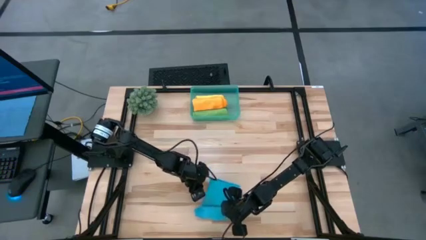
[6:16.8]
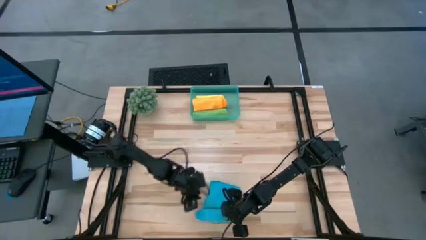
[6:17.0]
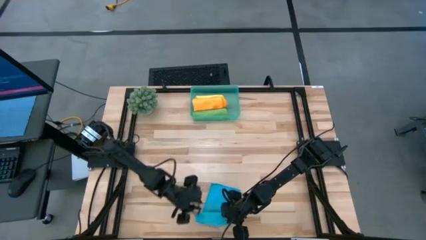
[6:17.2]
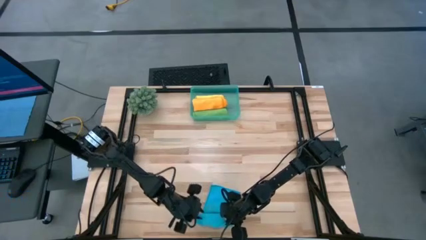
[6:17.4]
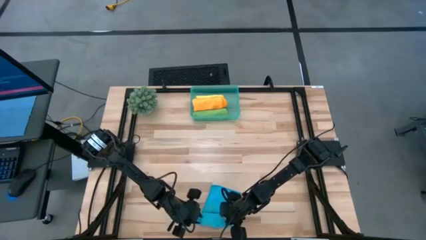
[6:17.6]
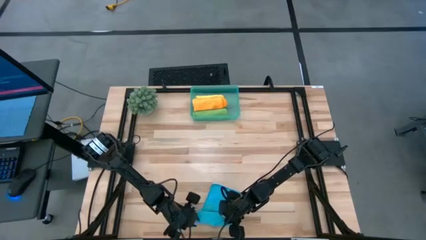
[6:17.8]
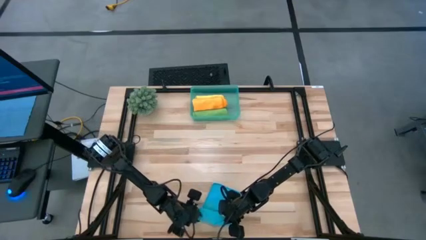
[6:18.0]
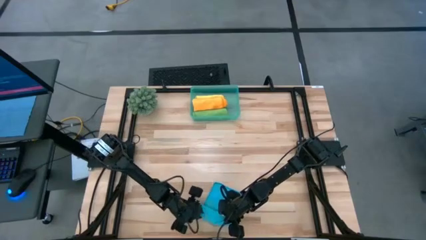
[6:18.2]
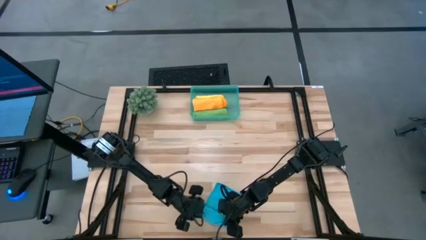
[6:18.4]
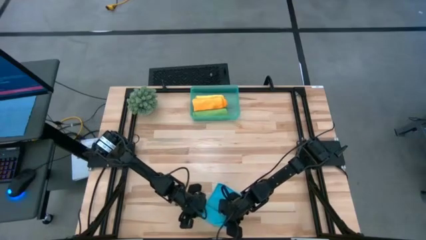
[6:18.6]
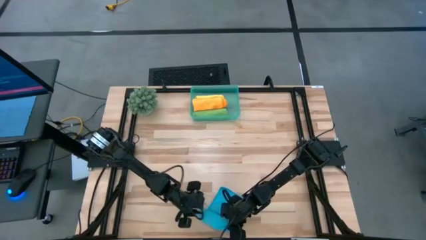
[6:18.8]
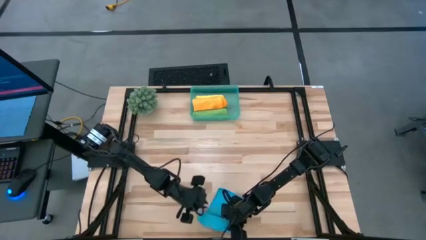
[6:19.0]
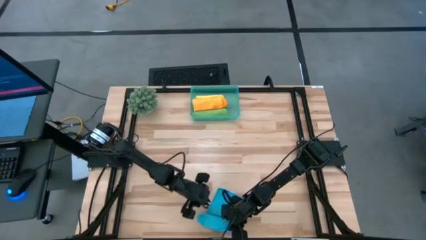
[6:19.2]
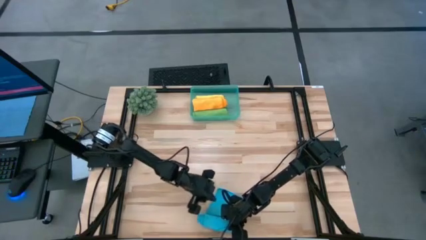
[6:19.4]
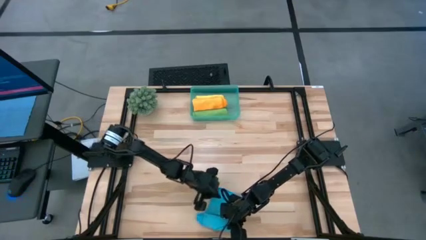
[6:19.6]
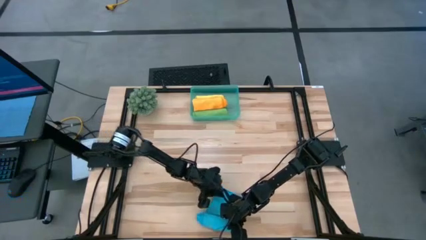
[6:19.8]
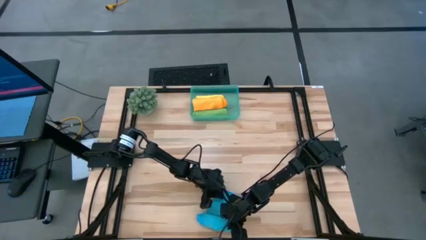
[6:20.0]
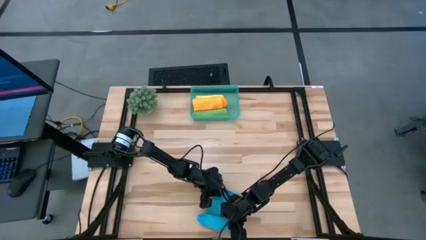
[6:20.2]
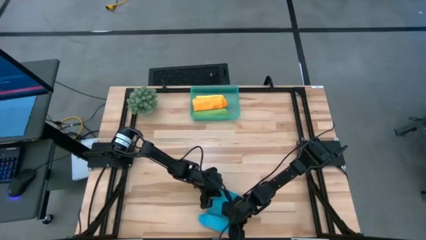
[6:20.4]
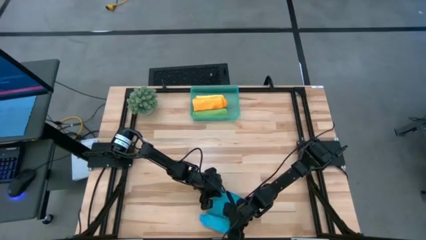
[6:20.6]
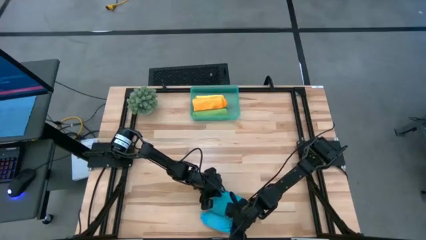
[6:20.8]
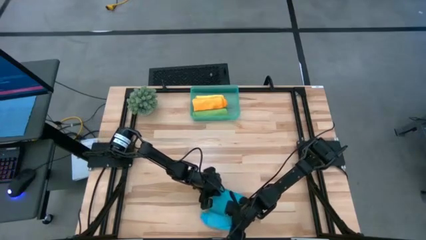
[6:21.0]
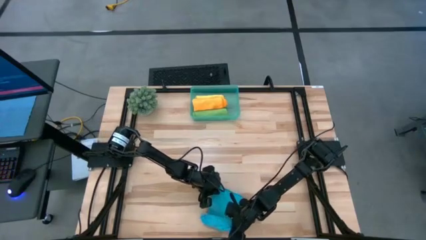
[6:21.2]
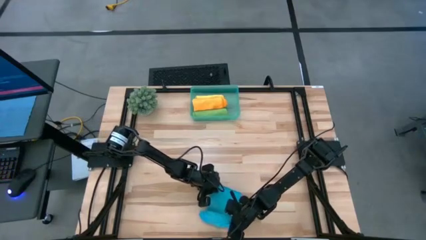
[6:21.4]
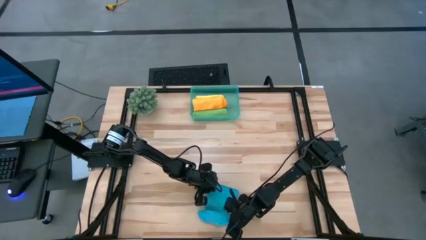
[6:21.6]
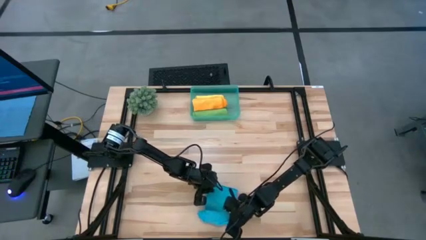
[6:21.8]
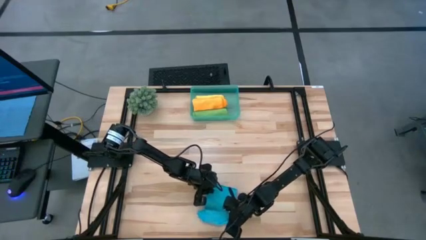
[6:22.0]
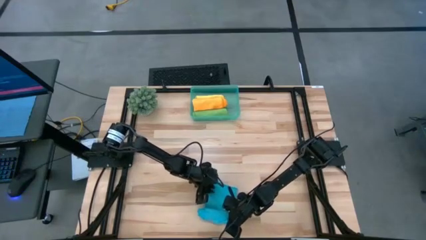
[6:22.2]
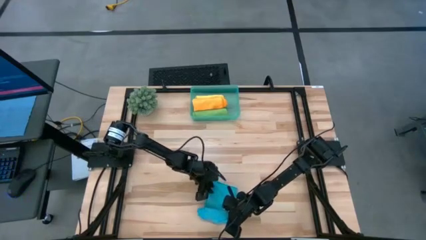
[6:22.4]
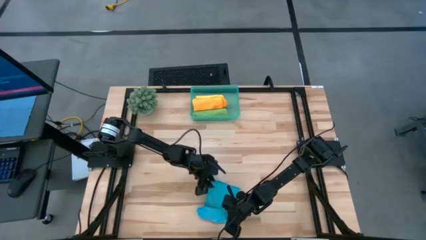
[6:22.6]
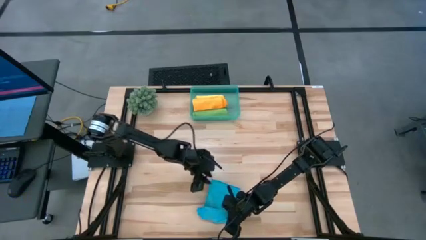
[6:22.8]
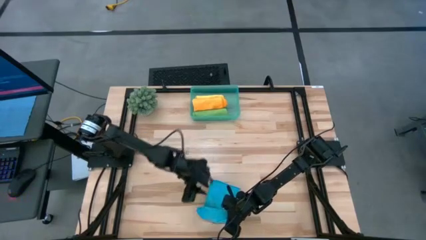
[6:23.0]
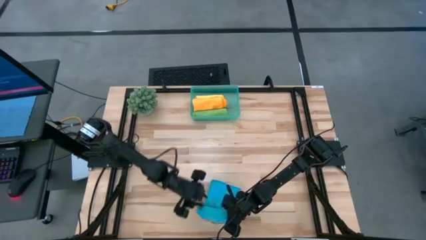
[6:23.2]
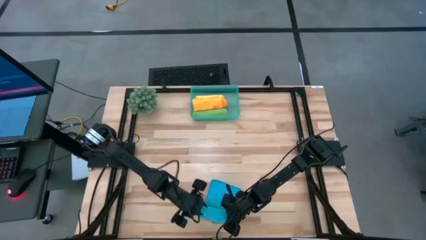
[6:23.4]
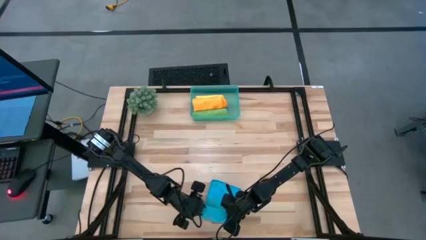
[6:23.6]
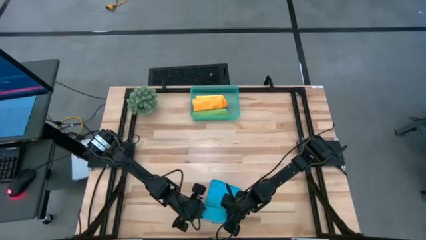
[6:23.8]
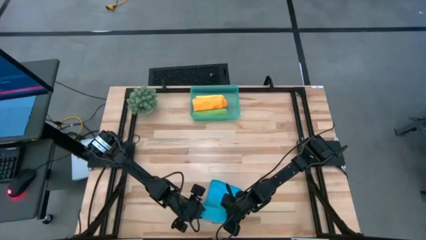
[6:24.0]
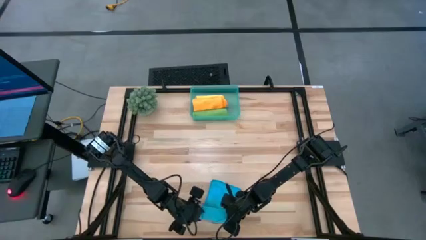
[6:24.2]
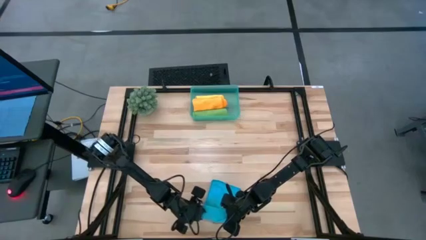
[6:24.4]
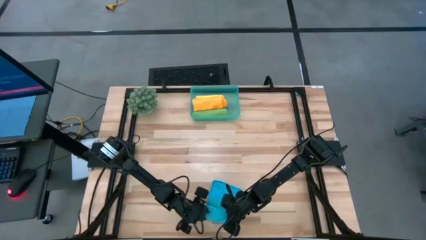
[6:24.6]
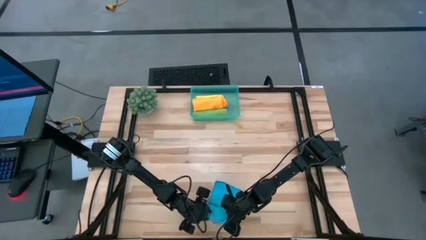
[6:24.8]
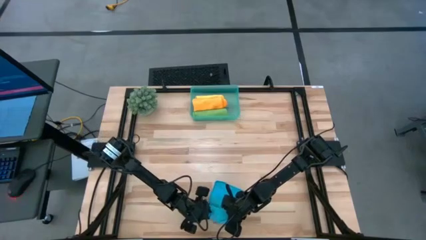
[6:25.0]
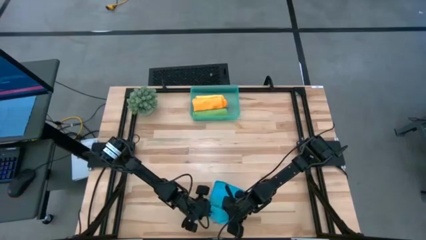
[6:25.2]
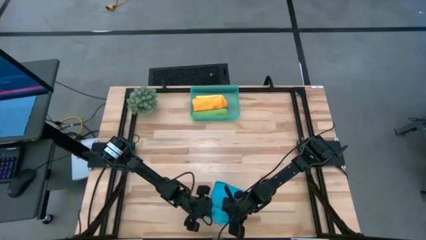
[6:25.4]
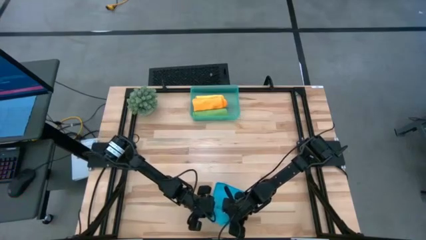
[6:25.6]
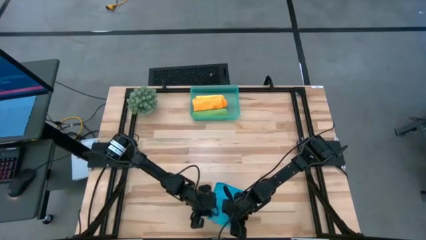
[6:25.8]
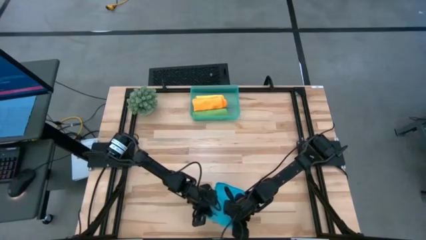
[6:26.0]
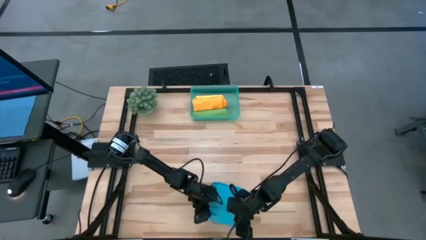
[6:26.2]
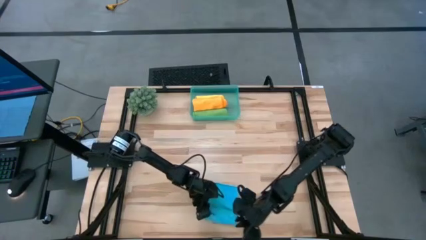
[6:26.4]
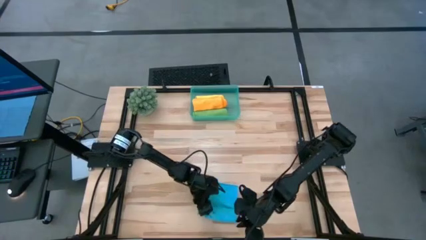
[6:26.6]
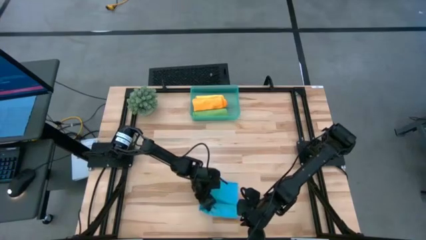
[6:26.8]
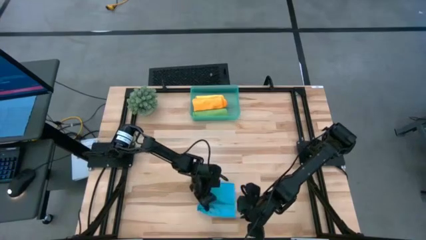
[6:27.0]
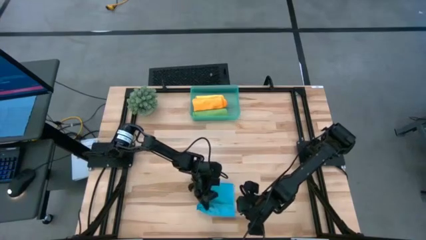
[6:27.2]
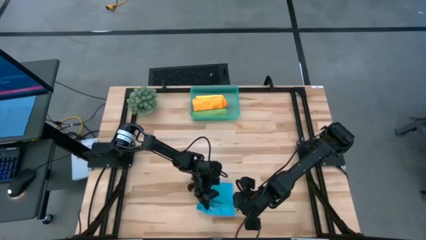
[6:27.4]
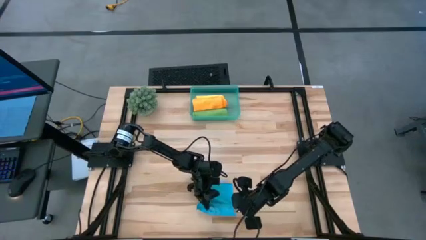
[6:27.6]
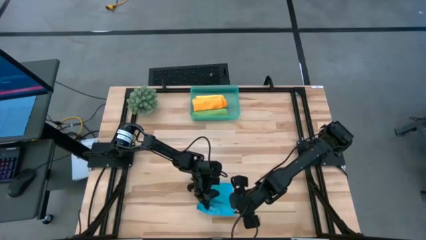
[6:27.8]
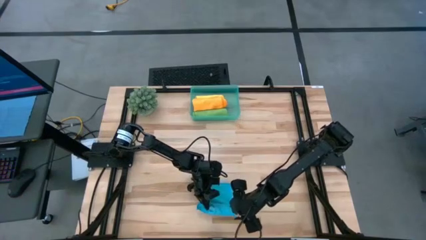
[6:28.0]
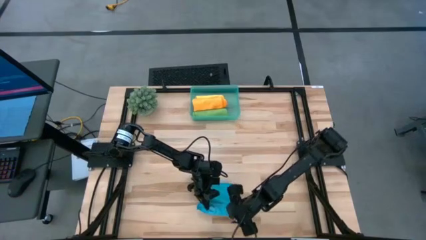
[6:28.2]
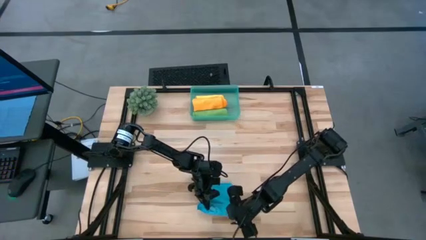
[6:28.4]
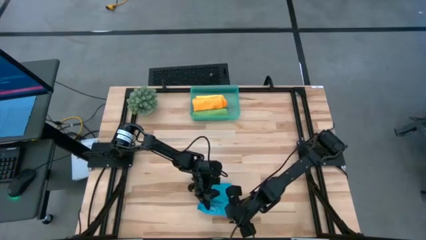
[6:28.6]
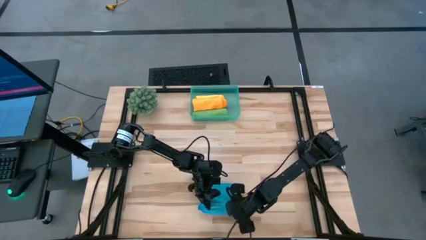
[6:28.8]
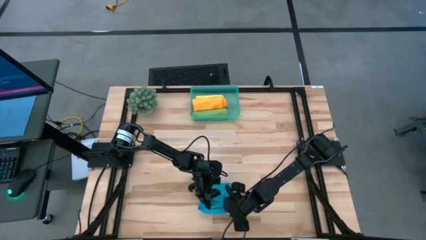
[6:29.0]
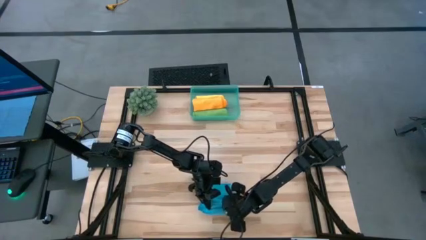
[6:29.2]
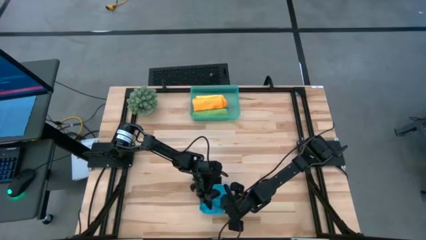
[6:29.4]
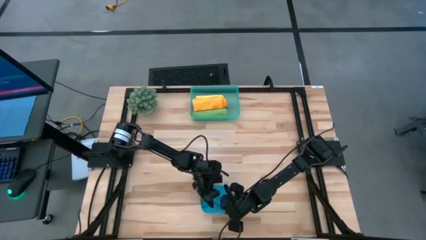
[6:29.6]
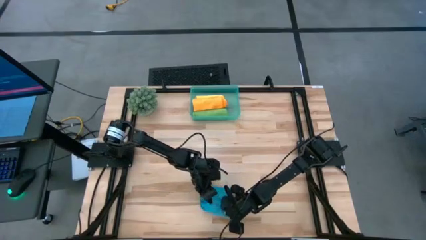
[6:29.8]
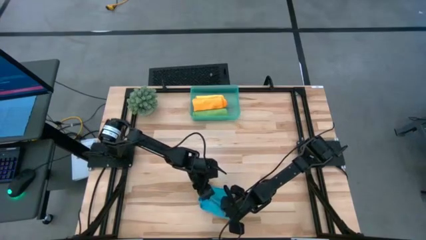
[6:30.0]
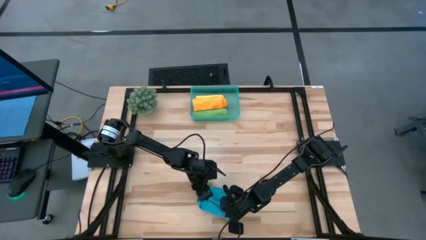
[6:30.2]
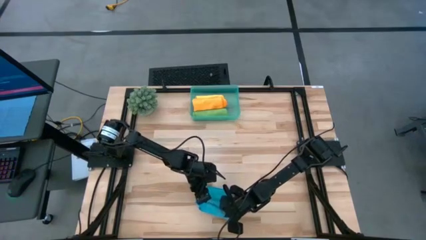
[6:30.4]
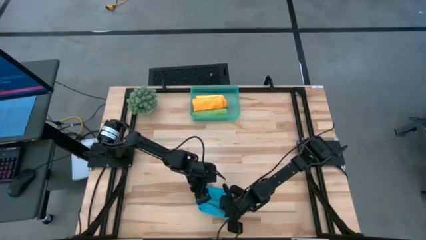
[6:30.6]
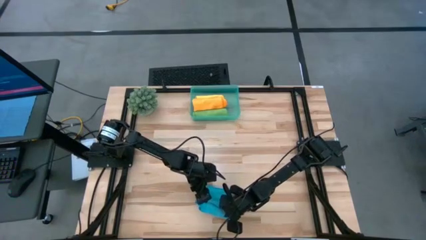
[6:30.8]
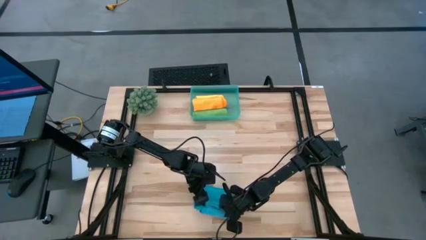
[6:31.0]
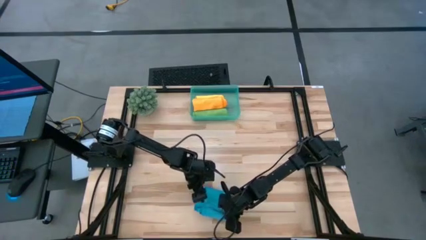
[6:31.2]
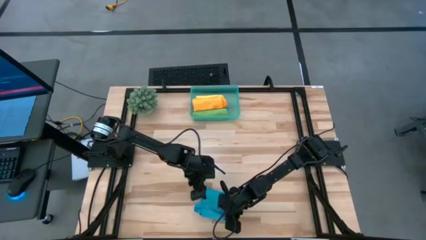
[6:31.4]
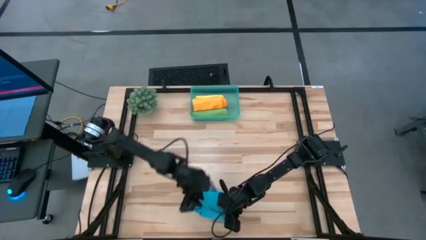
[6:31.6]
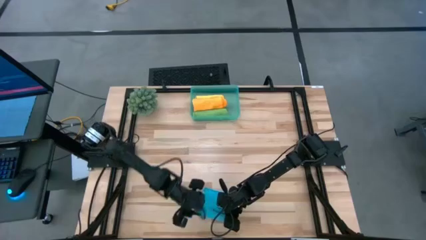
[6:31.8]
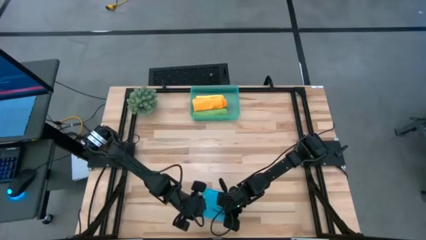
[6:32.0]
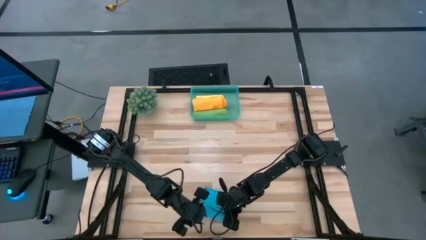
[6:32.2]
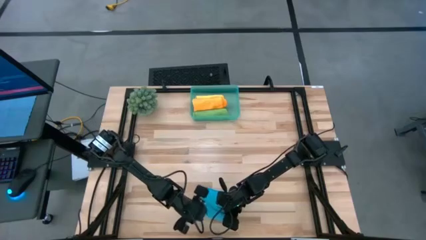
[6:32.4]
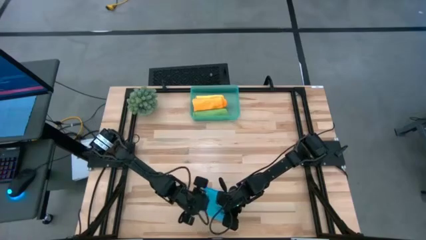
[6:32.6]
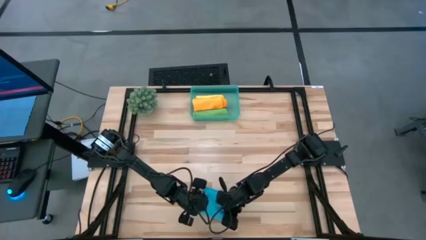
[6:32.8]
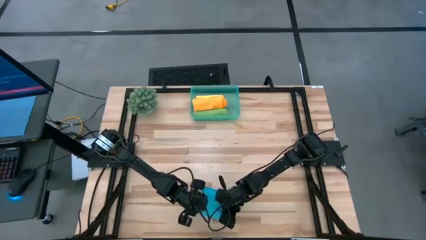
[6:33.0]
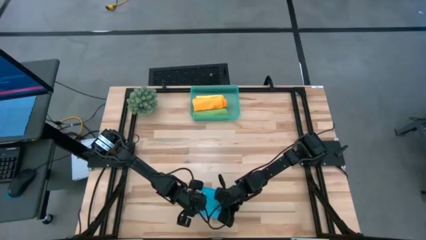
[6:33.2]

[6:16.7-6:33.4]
Task: Roll microfiber towels into tight, uniform cylinder then place into a basket
Roll the blue towel
